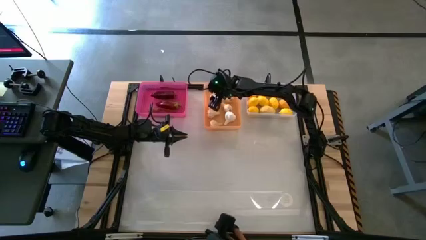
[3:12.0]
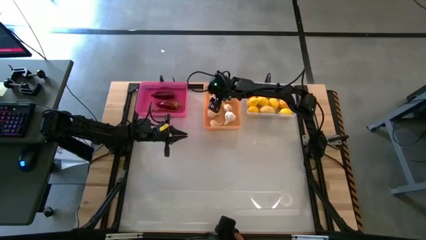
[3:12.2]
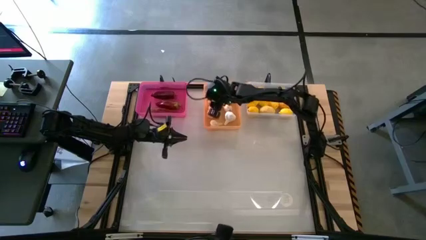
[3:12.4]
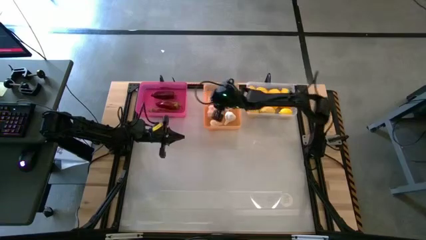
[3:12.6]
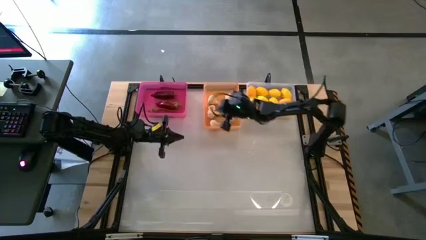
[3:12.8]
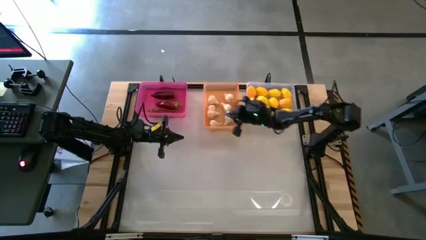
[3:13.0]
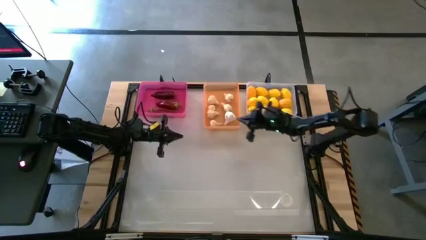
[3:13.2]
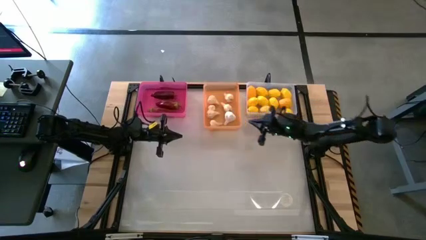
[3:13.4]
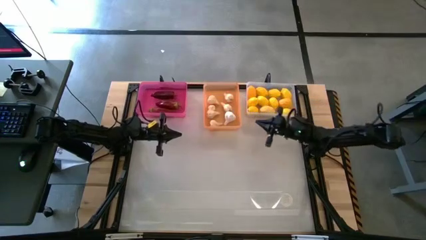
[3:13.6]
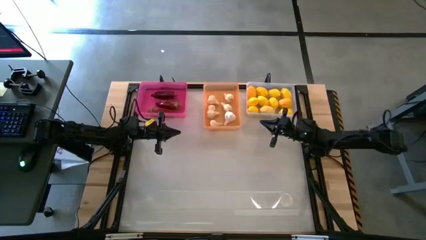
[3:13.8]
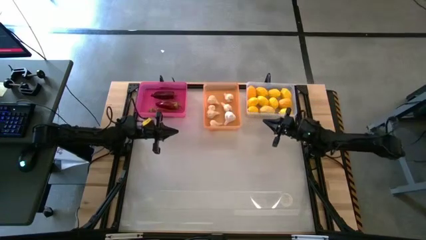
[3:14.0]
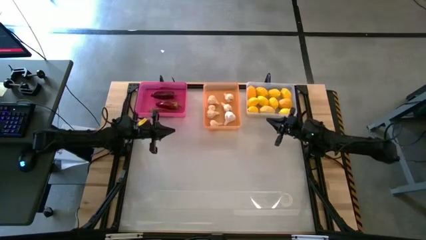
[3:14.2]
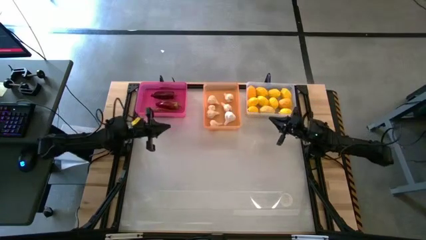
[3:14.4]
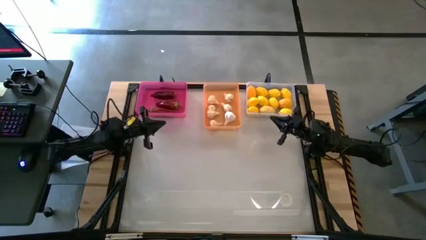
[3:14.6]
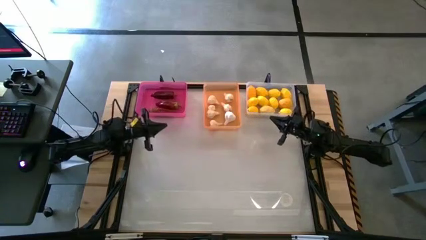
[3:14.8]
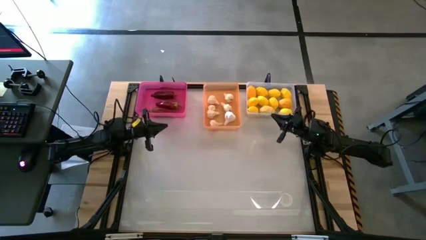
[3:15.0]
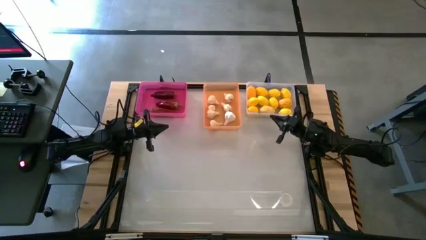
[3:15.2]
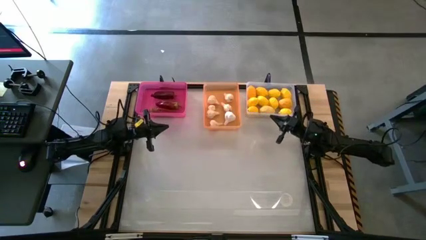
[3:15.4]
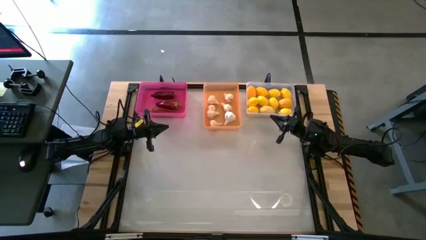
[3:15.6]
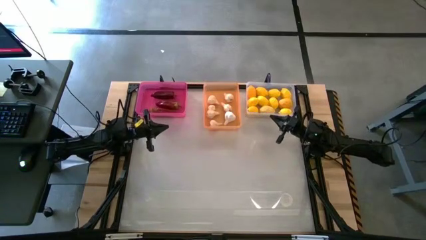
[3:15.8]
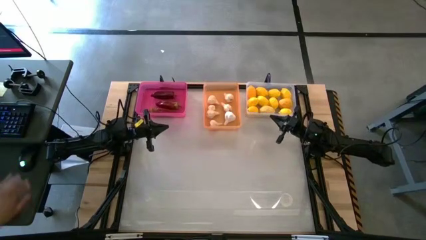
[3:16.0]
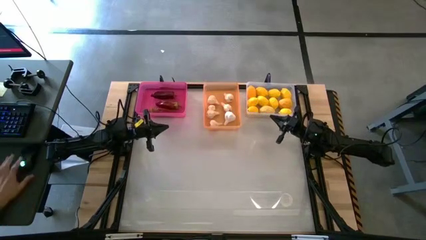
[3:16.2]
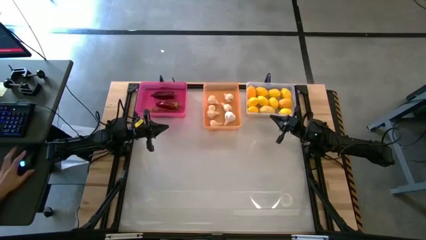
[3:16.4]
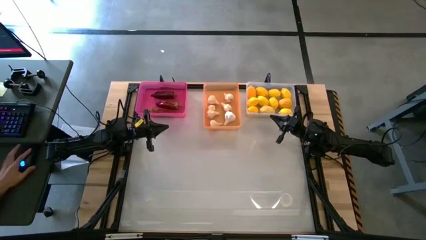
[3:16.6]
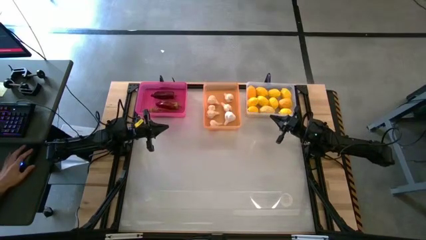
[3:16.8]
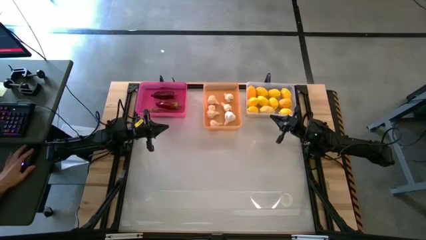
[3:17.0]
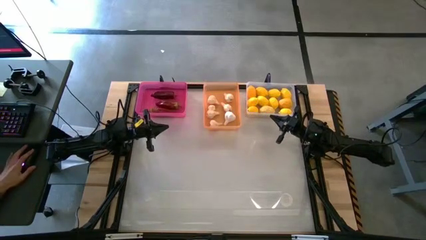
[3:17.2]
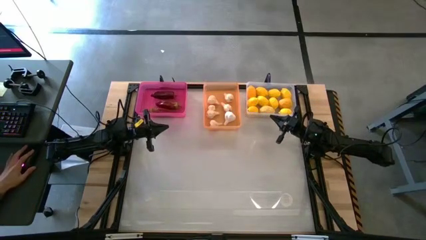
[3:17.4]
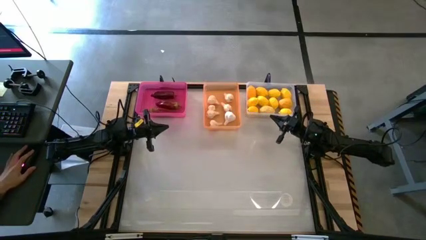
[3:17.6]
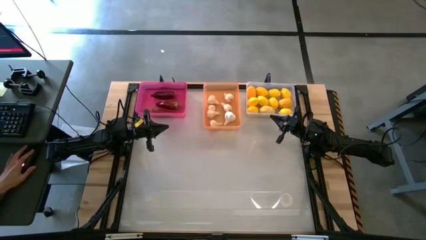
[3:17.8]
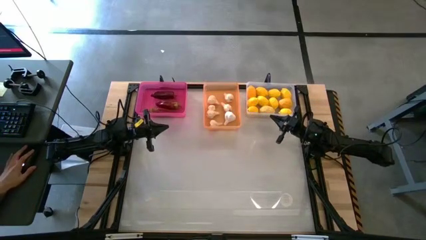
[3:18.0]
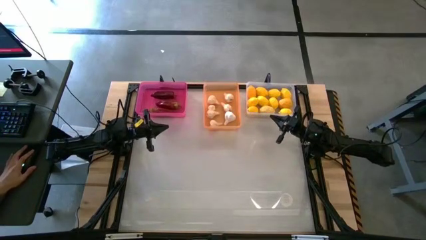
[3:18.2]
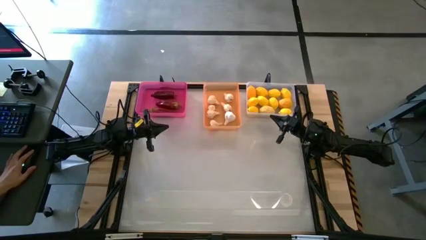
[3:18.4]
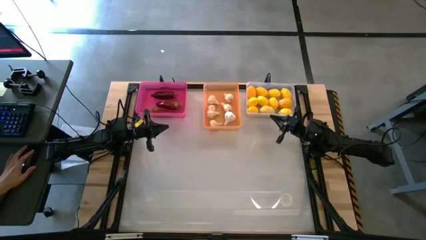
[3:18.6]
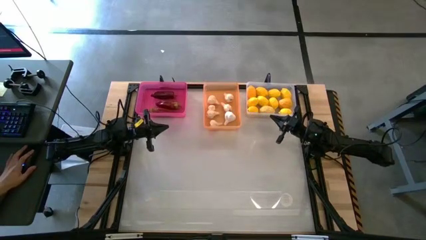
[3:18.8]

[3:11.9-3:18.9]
Task: Sort produce into baskets
Return to Home Position

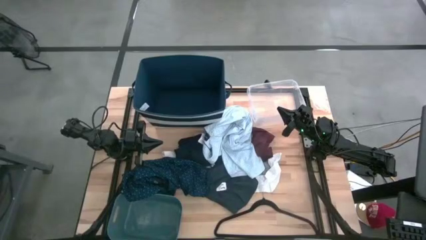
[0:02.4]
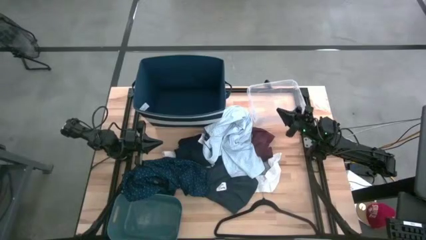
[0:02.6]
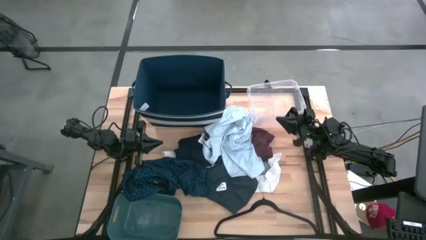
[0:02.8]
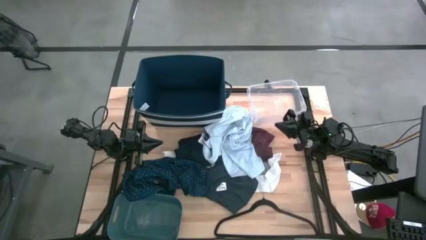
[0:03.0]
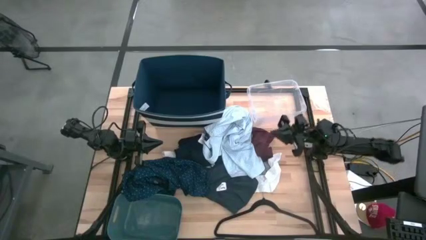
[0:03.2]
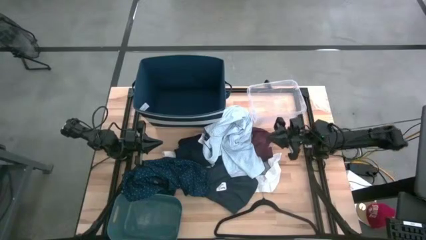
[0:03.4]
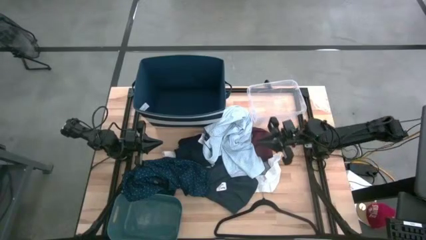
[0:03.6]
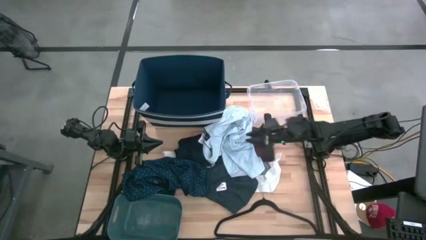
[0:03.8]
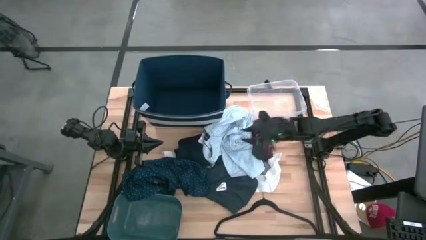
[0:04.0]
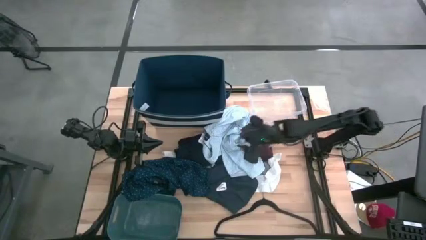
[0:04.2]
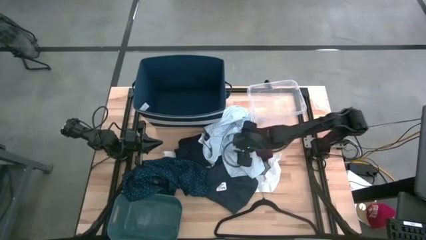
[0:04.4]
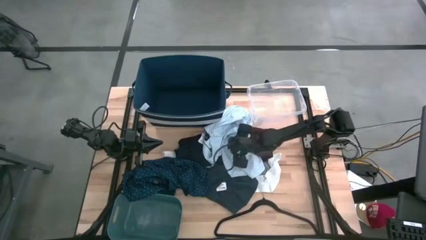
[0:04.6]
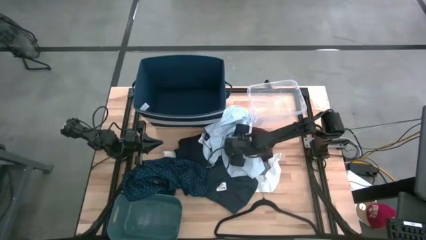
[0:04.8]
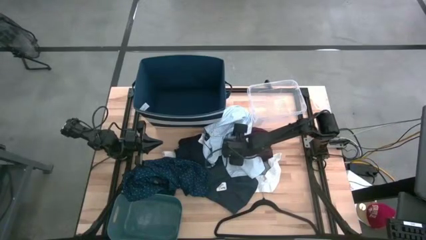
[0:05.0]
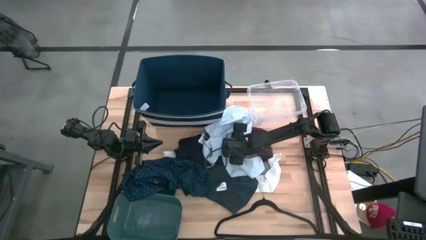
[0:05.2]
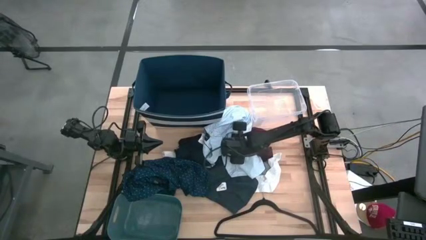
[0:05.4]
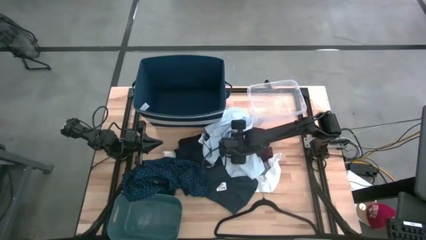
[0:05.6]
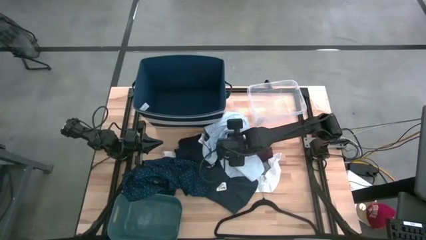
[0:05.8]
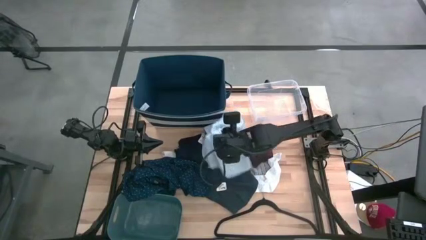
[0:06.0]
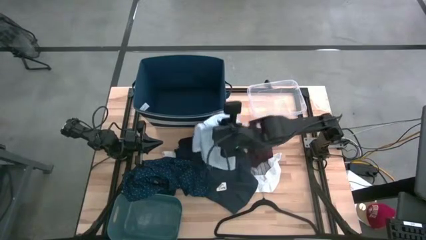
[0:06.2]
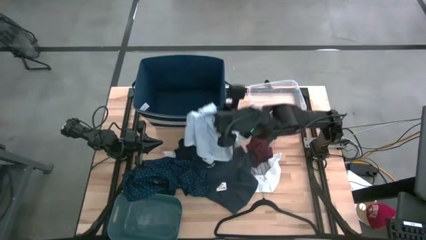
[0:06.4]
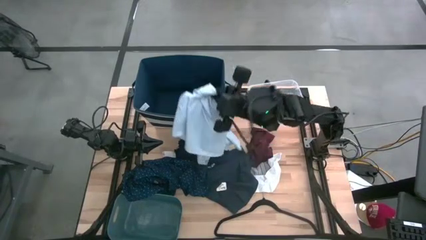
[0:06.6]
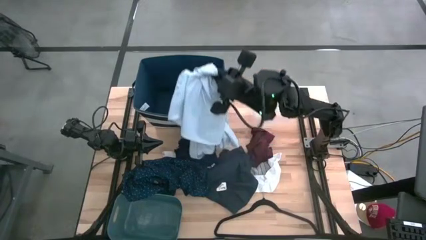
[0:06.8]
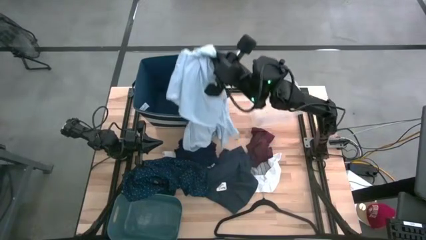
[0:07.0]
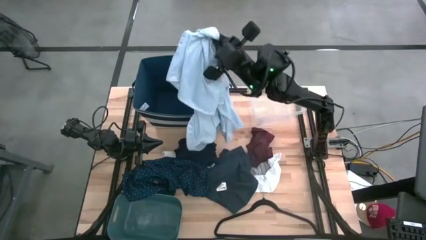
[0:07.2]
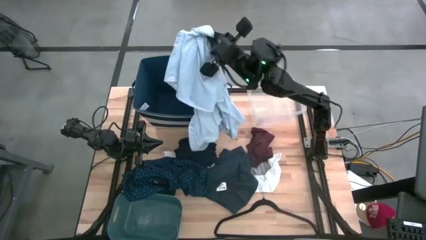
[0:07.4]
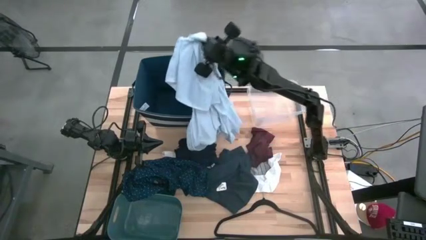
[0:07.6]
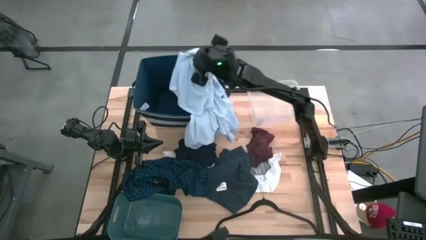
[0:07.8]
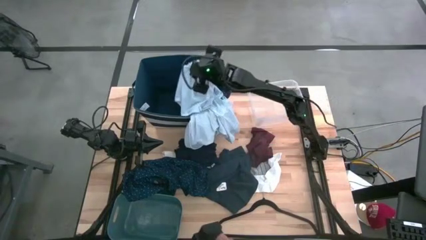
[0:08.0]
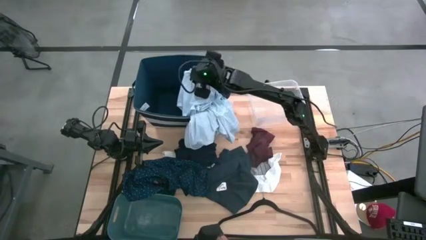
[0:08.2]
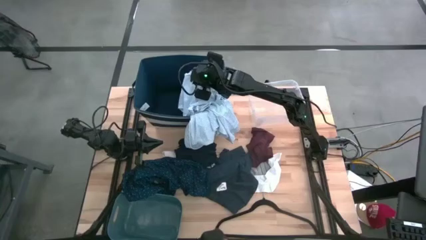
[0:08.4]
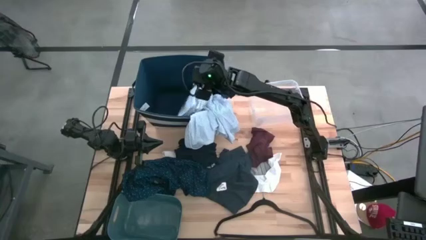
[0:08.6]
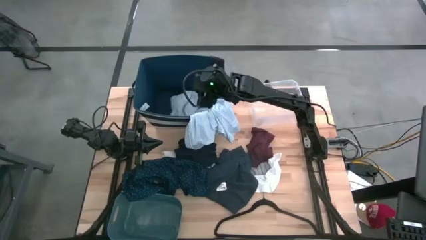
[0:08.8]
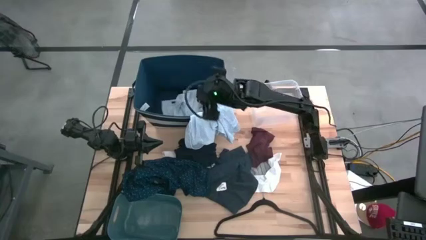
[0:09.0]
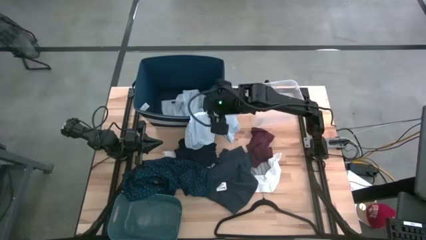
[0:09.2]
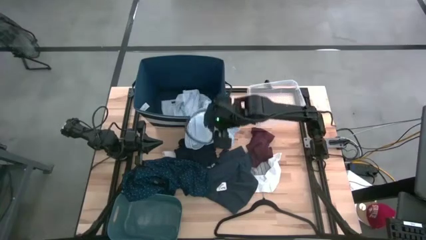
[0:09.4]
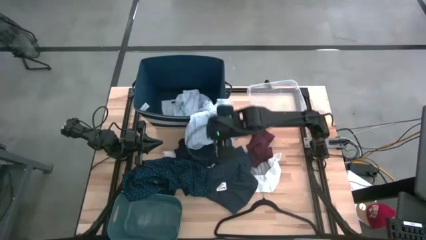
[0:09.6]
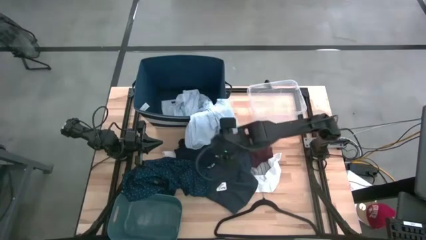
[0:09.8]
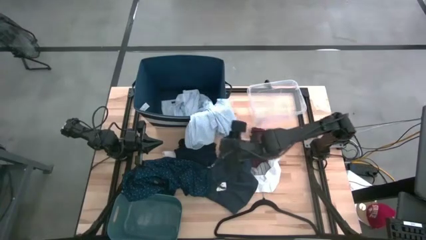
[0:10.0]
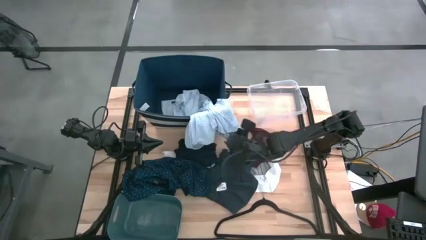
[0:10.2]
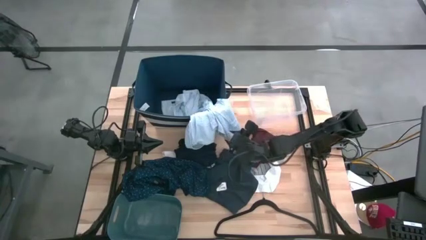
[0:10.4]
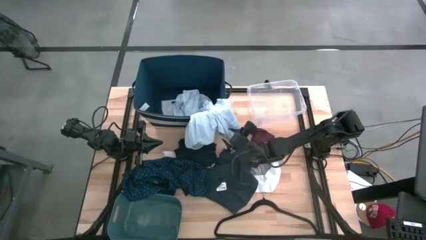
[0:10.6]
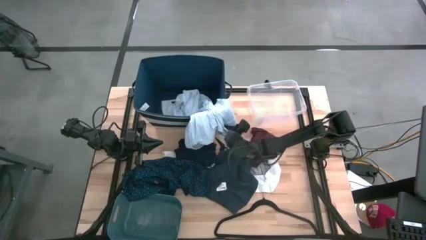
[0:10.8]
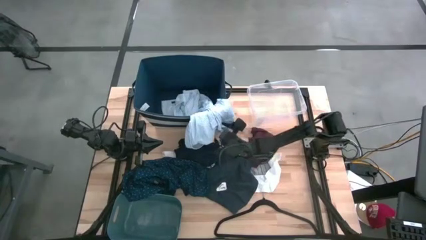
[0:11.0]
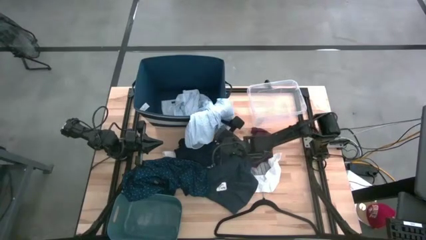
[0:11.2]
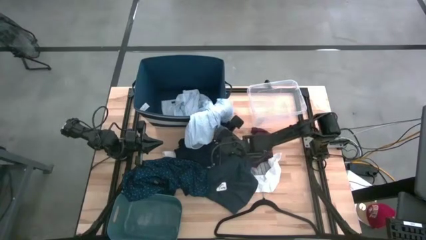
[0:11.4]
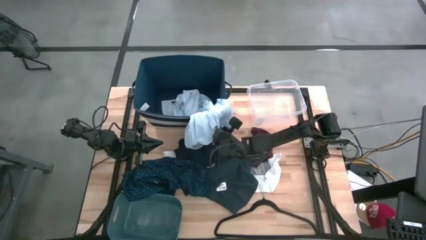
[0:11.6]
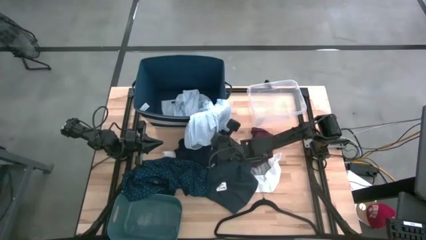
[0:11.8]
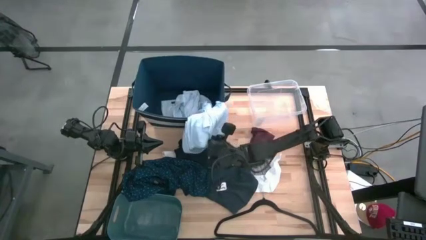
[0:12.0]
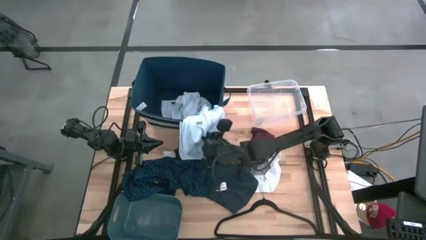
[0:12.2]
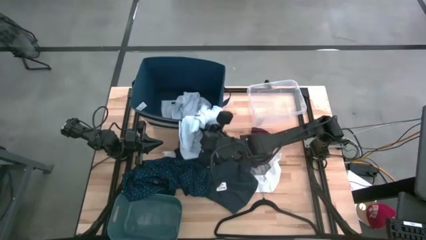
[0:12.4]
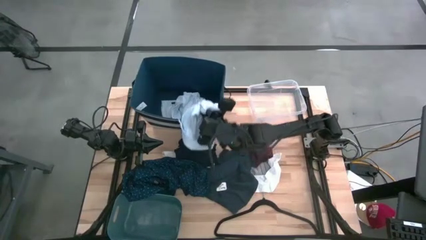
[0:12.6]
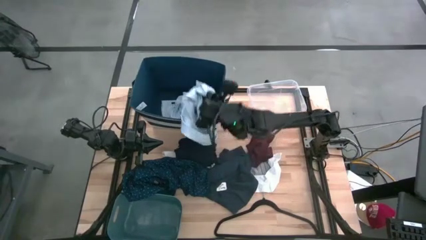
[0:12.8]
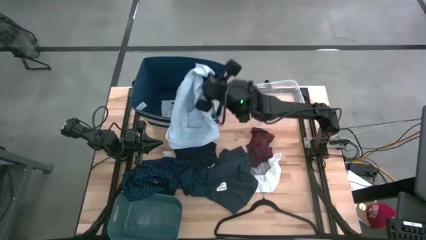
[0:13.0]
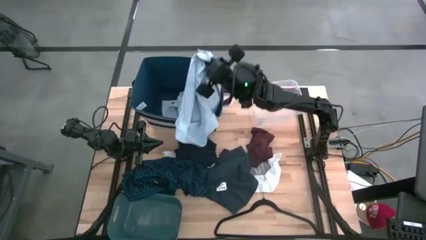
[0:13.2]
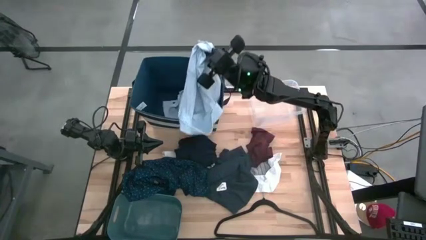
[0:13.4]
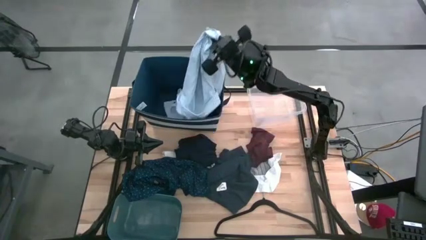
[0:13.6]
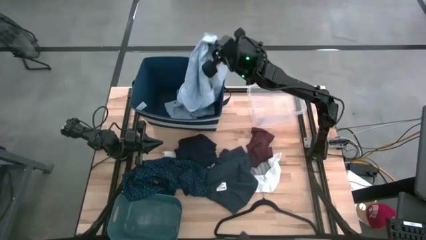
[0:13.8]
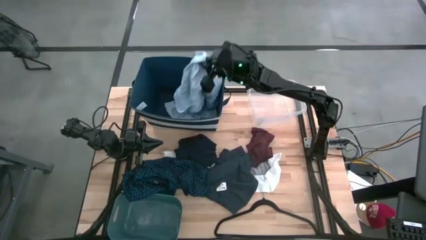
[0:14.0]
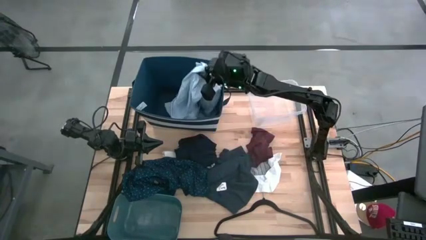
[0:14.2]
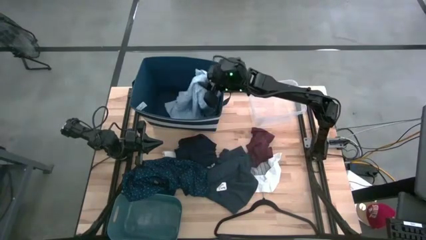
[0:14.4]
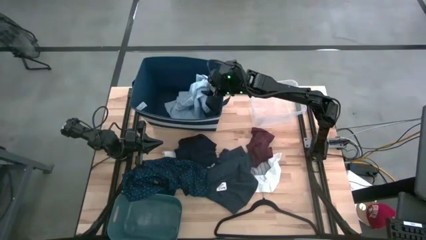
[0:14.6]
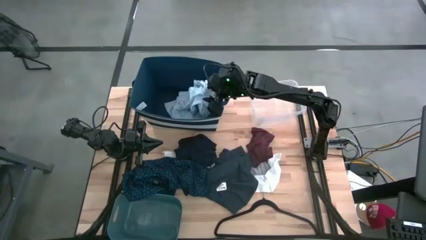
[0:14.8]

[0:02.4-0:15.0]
Task: Pick & Place Cloths
Put the light blue polo shirt into the blue laundry organizer
